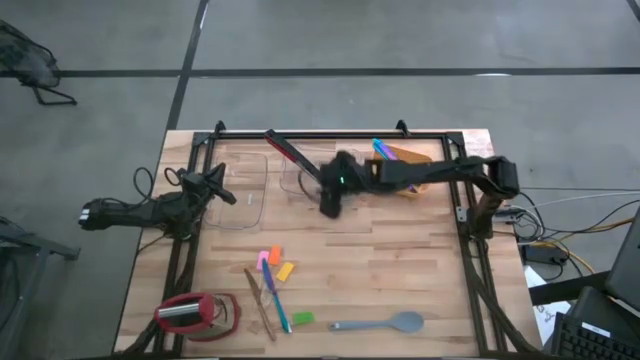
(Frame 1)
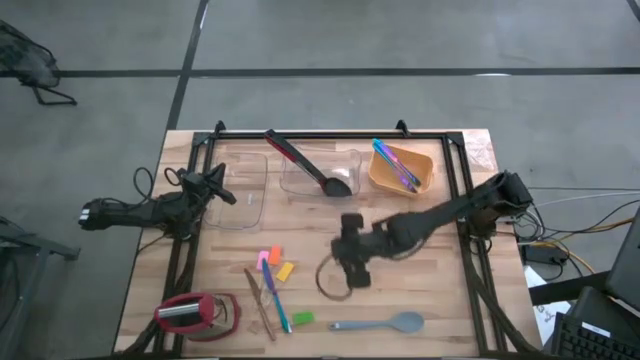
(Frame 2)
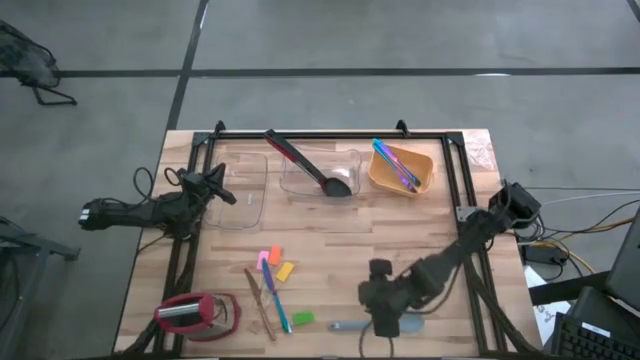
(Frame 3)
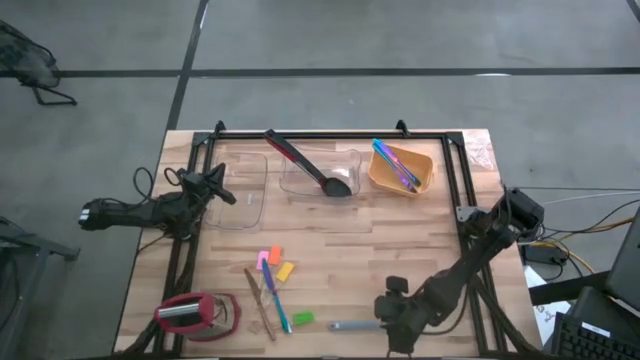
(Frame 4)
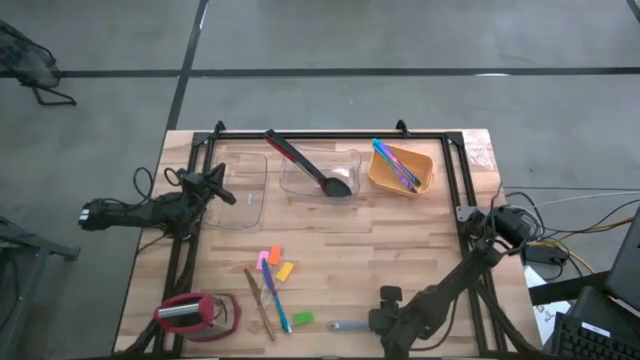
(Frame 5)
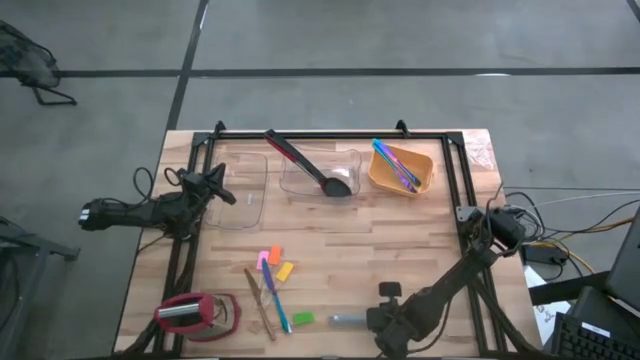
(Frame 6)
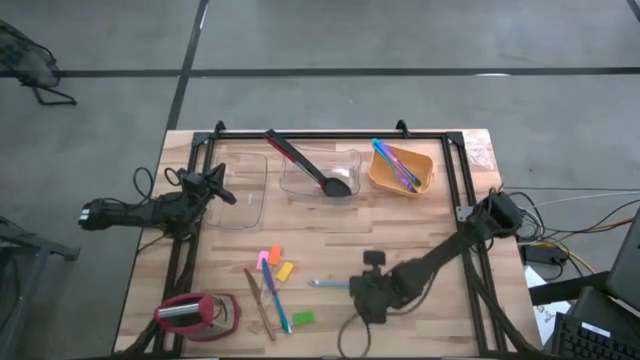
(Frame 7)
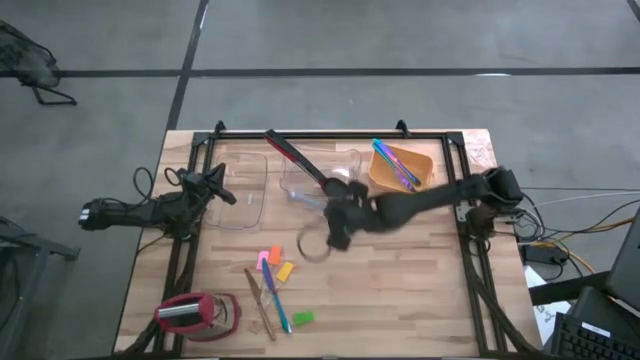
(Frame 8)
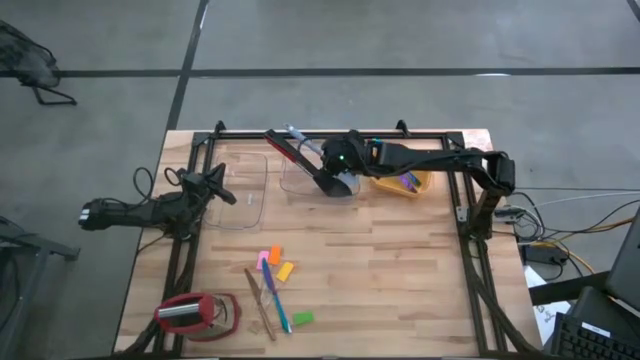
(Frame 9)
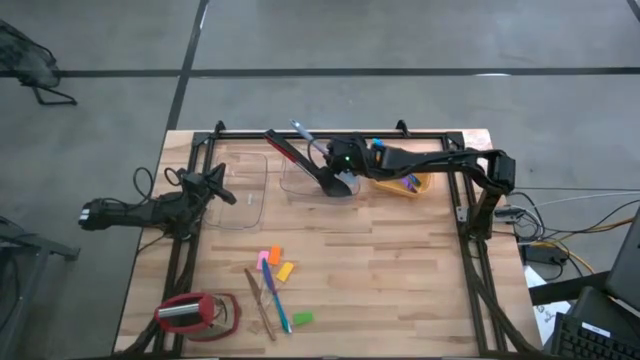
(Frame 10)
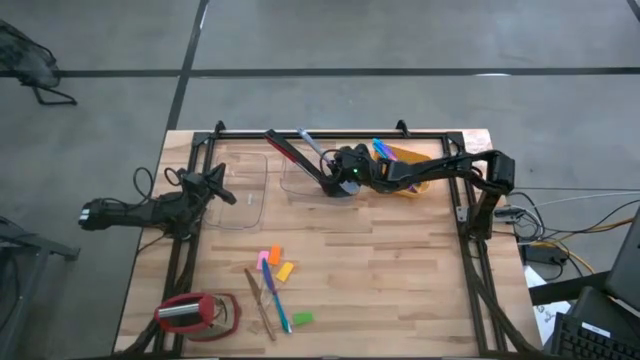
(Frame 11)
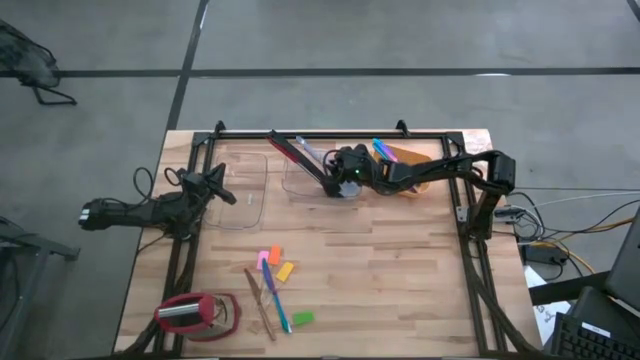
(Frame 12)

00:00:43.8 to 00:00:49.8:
Task: Sort silverware by color (type)
Put the blue spatula into the right transparent bin

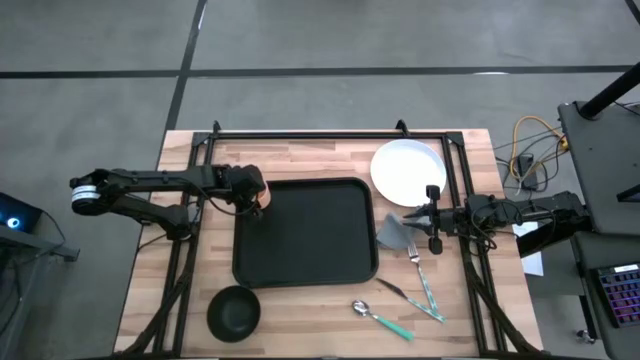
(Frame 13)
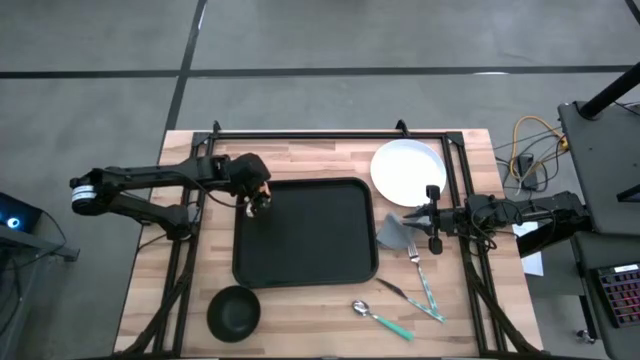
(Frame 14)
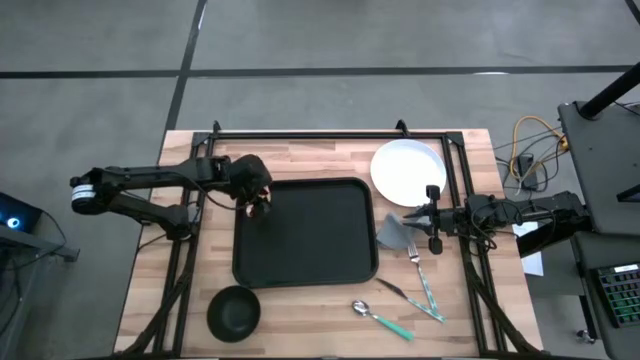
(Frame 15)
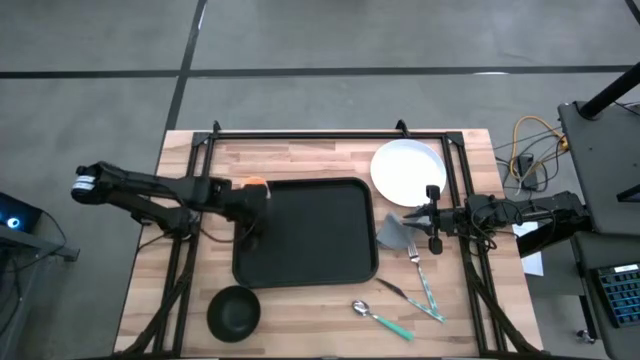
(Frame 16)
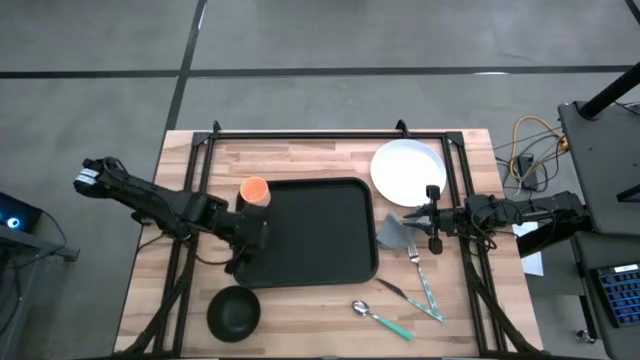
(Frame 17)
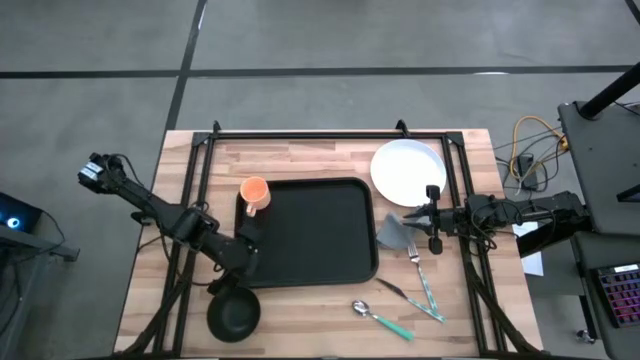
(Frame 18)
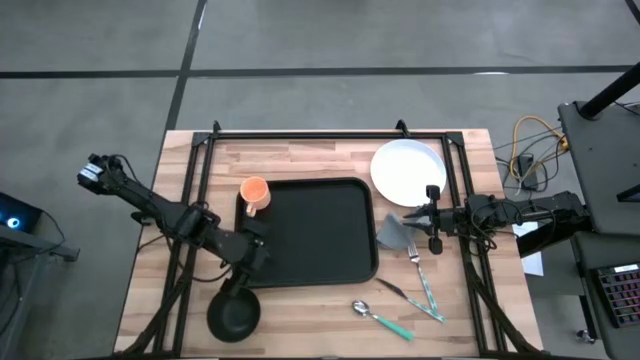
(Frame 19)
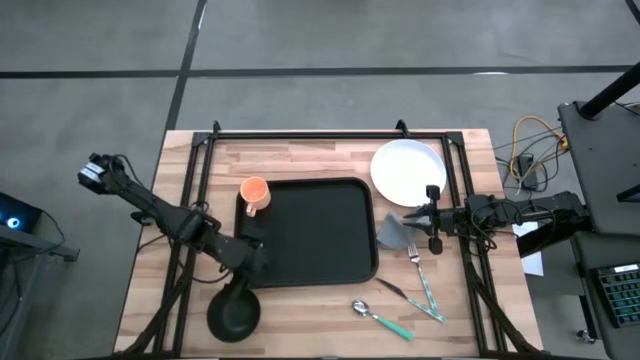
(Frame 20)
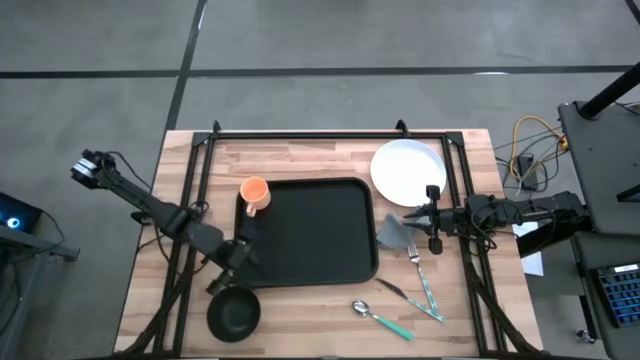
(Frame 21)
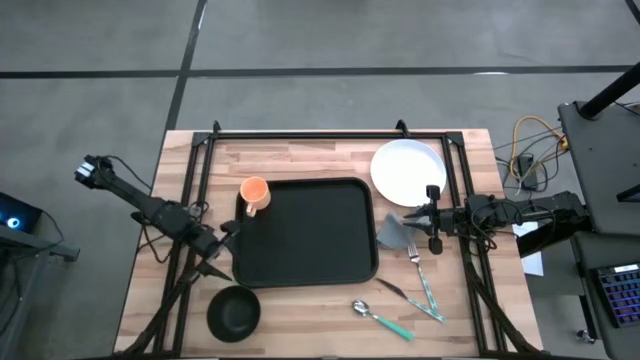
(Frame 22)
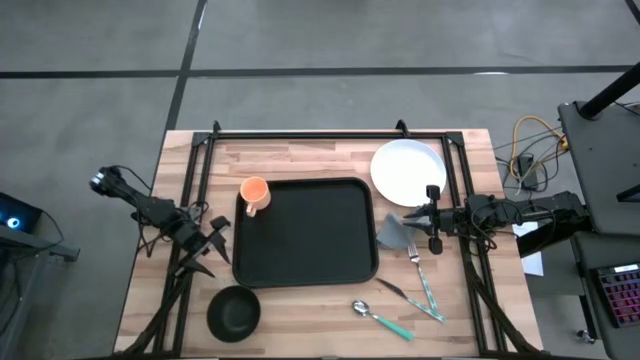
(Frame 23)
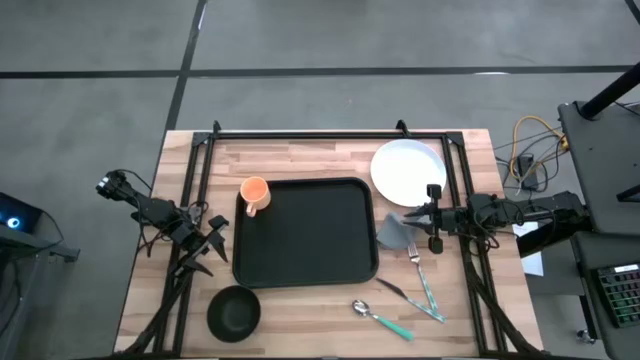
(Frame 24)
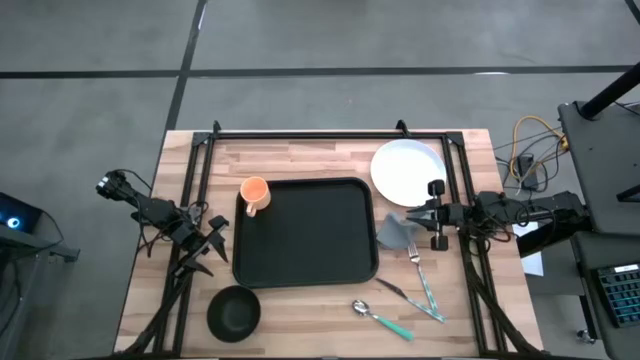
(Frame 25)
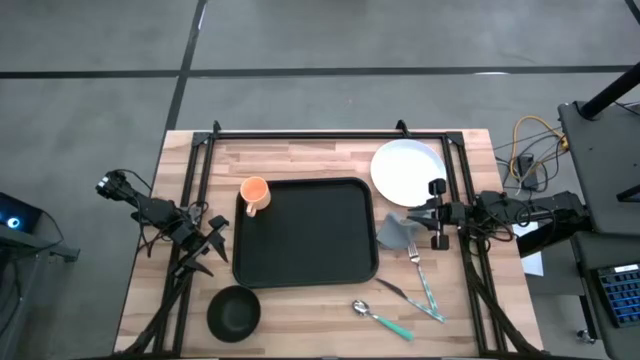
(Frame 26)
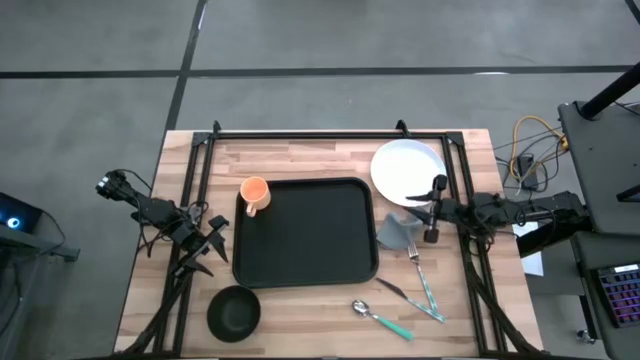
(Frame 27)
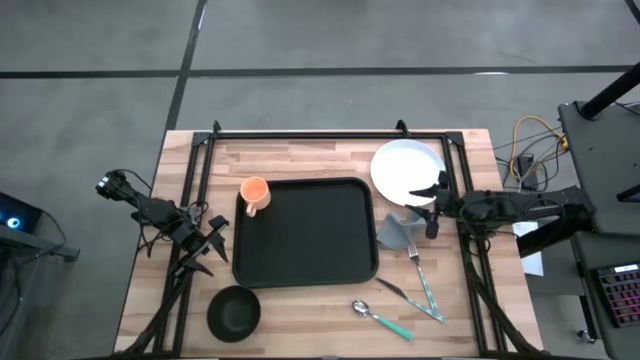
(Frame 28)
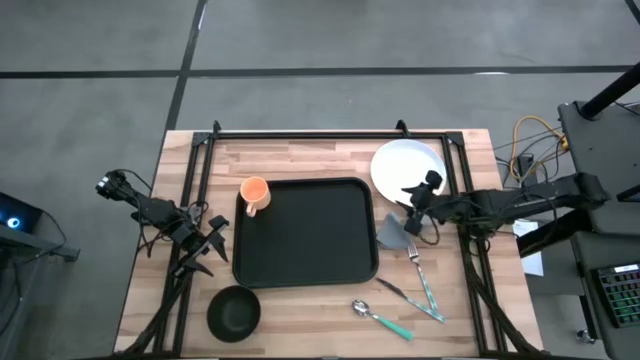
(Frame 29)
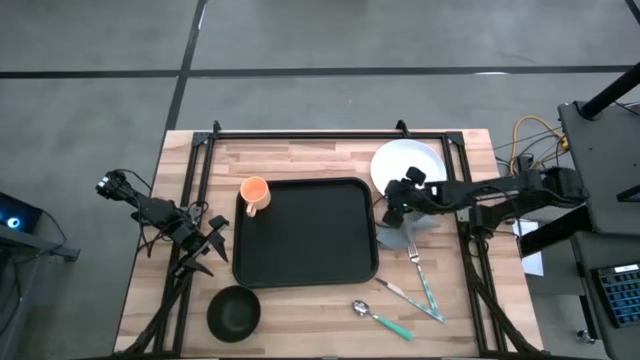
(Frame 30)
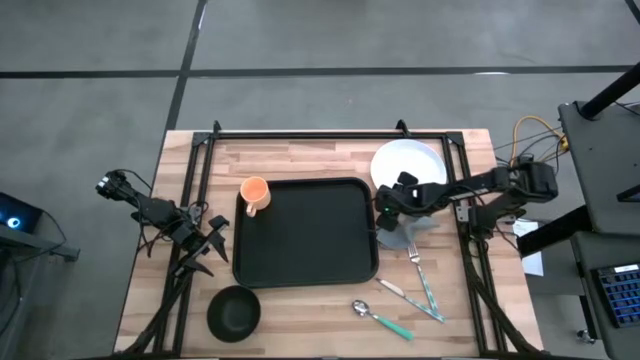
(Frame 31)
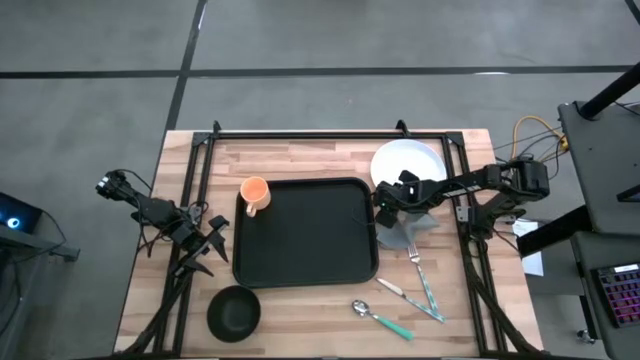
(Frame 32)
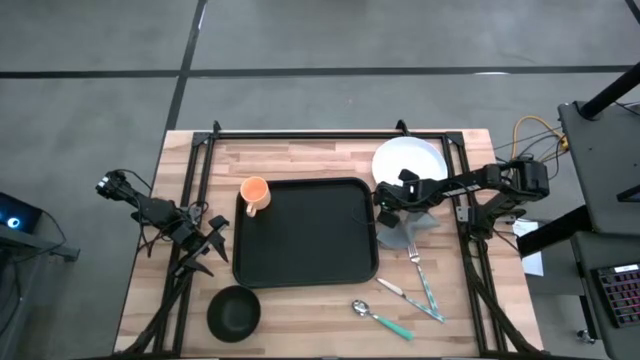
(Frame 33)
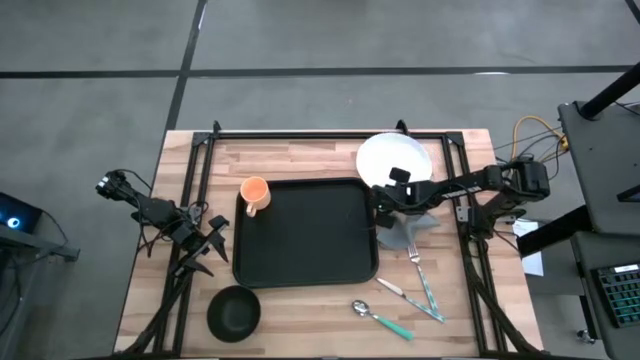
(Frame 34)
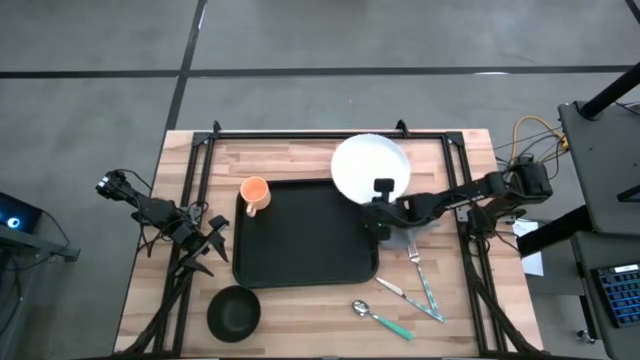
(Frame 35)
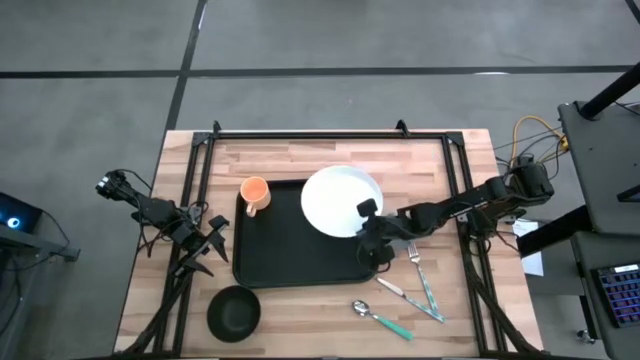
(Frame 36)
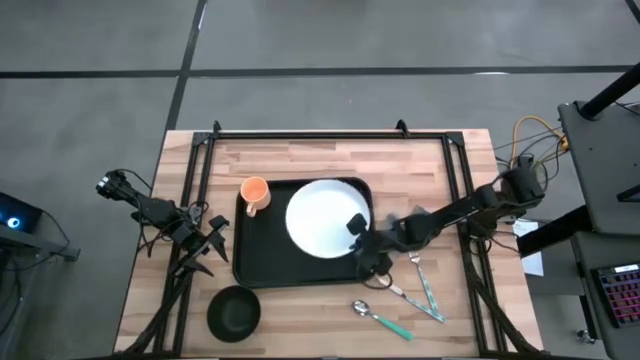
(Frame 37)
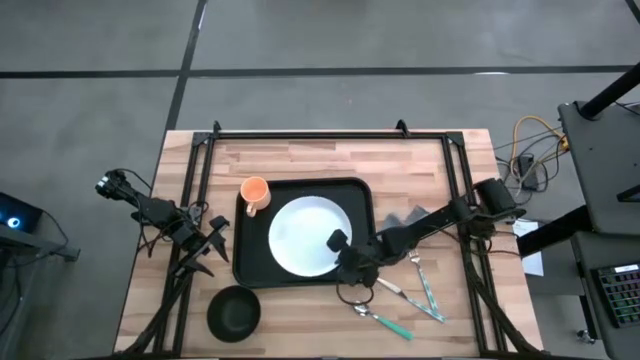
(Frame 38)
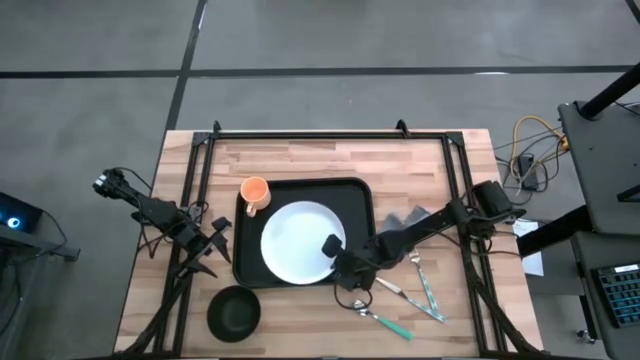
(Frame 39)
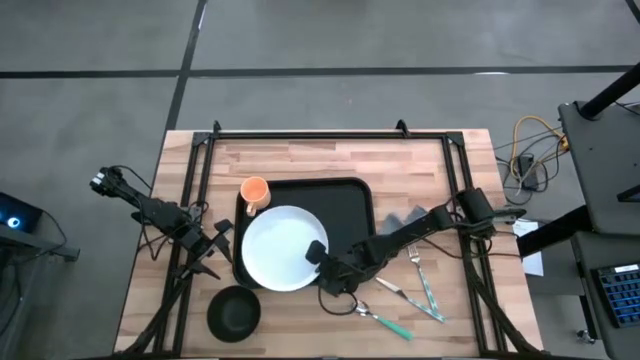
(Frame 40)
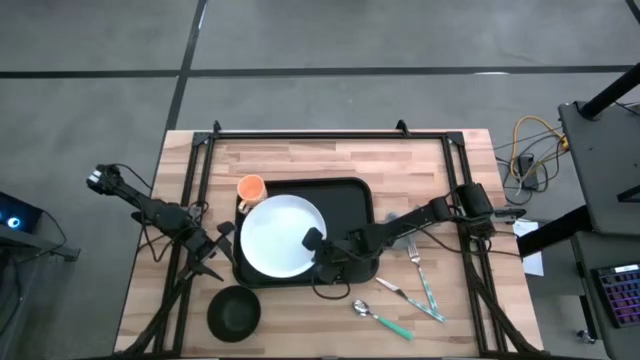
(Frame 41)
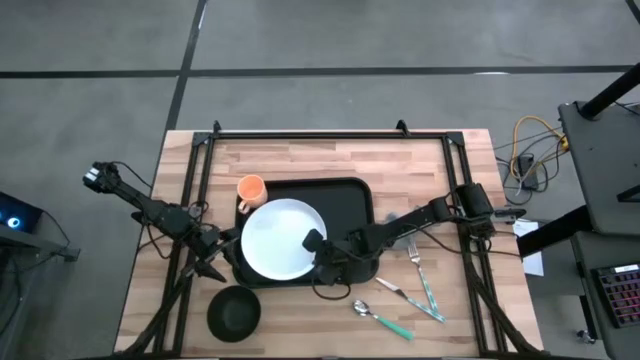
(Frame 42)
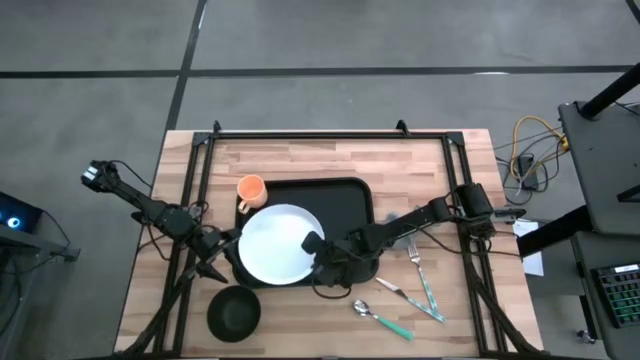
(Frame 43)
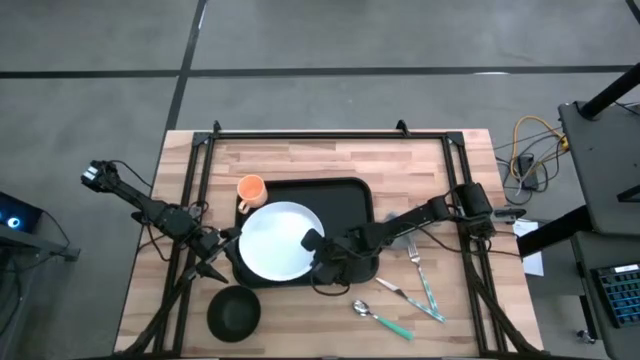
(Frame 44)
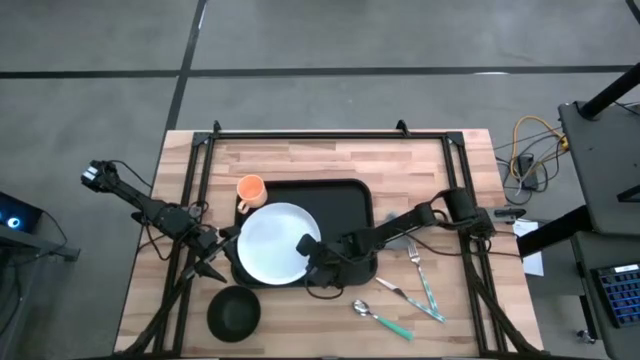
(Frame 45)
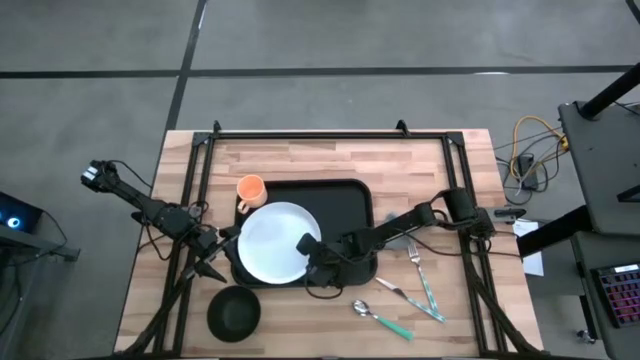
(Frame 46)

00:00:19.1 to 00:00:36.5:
Task: Set up tray
Put the white plate on the black tray
